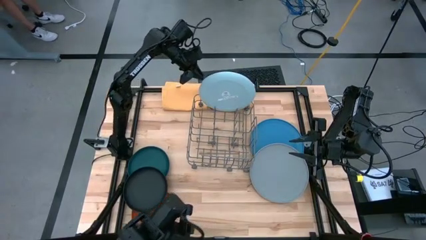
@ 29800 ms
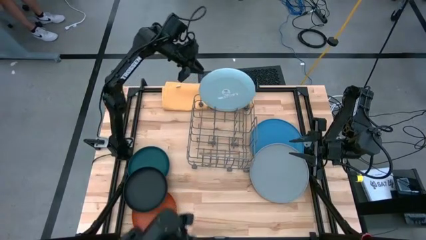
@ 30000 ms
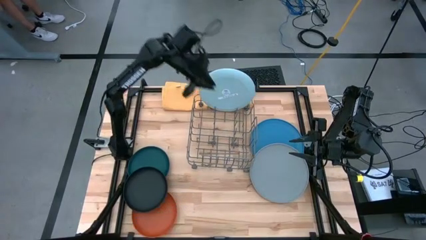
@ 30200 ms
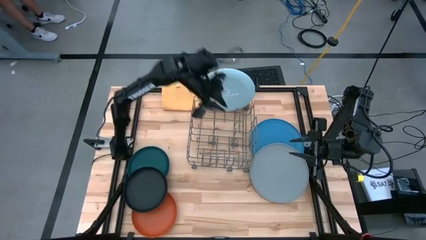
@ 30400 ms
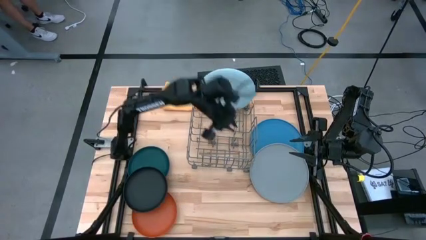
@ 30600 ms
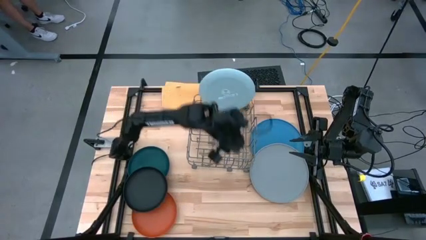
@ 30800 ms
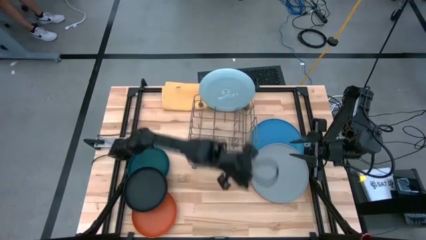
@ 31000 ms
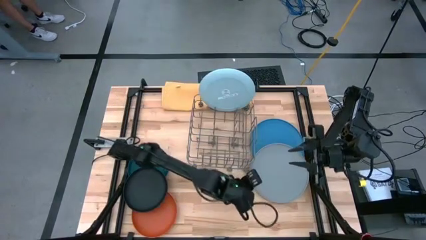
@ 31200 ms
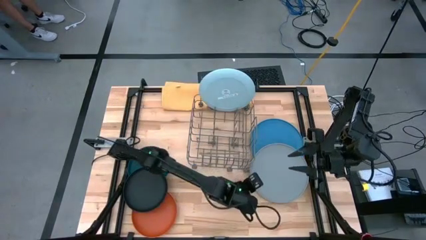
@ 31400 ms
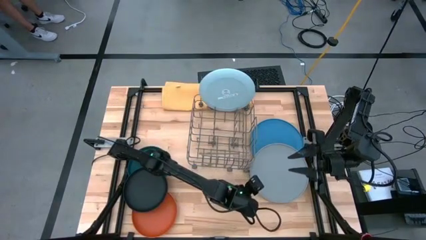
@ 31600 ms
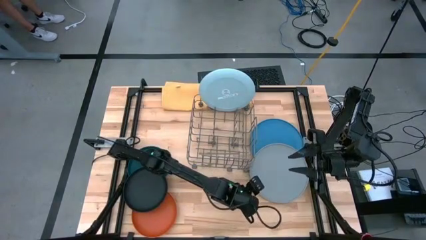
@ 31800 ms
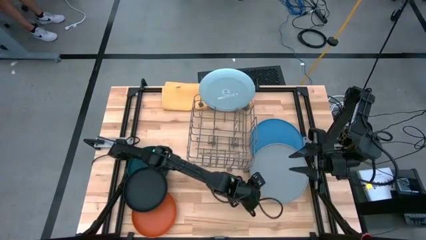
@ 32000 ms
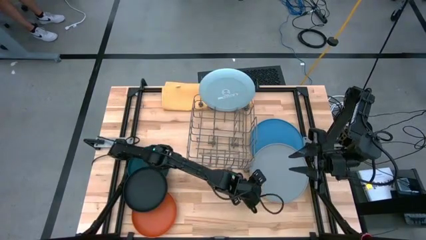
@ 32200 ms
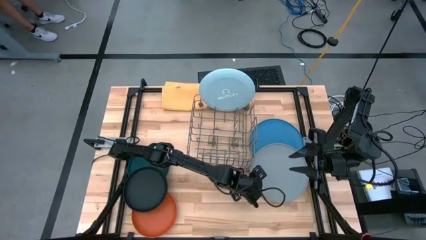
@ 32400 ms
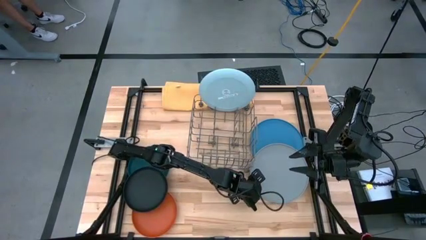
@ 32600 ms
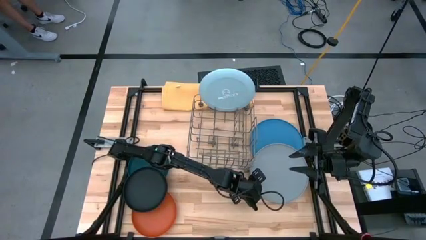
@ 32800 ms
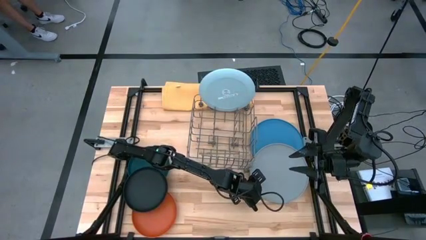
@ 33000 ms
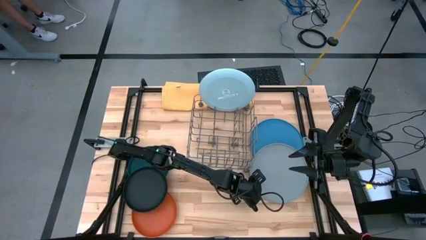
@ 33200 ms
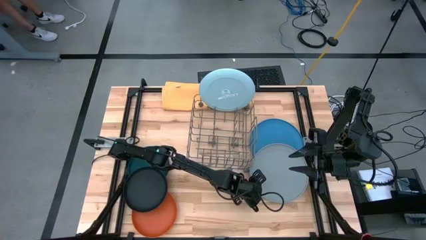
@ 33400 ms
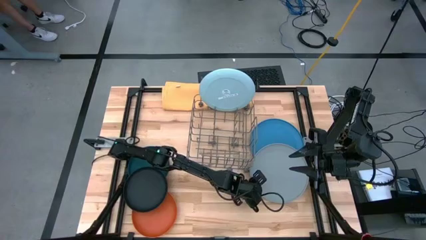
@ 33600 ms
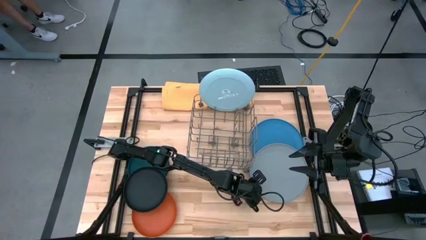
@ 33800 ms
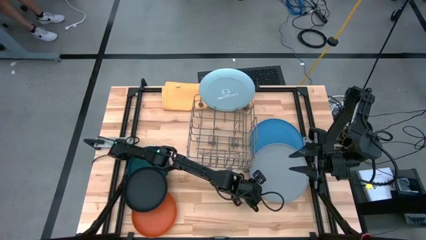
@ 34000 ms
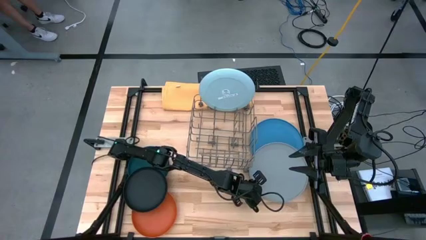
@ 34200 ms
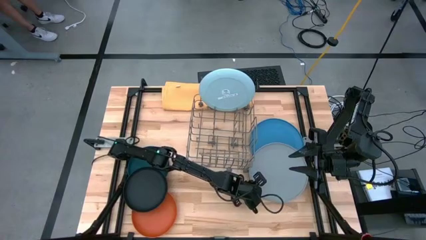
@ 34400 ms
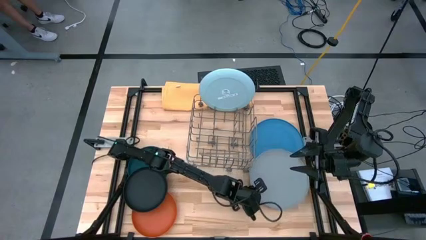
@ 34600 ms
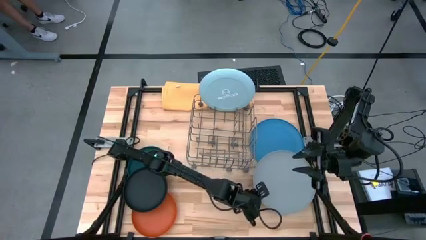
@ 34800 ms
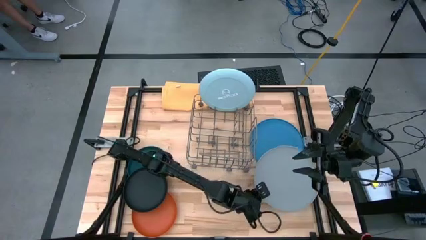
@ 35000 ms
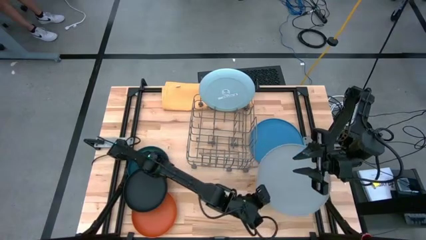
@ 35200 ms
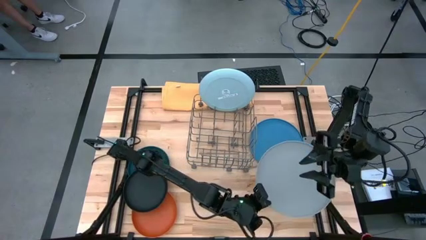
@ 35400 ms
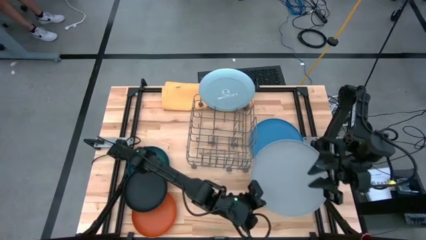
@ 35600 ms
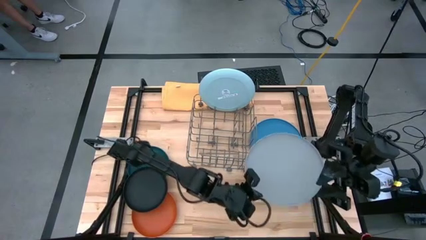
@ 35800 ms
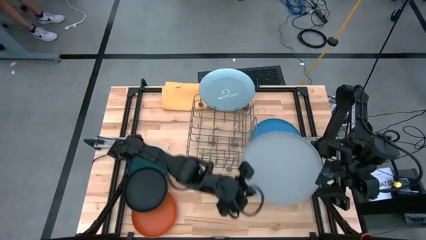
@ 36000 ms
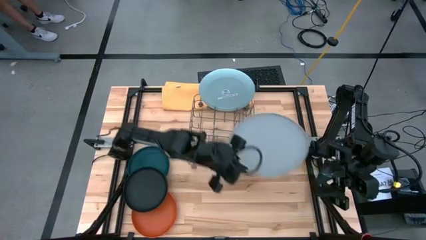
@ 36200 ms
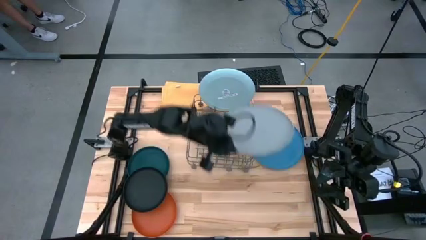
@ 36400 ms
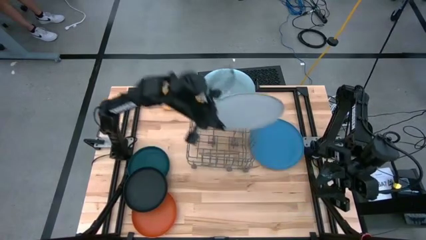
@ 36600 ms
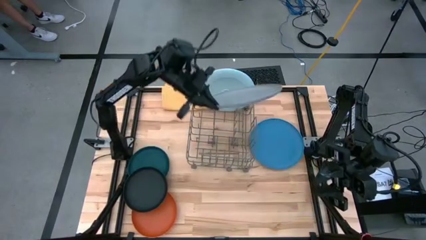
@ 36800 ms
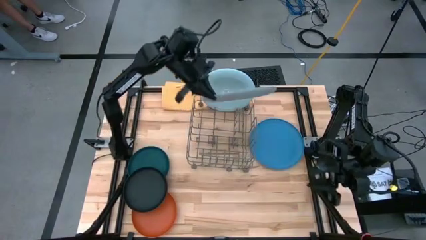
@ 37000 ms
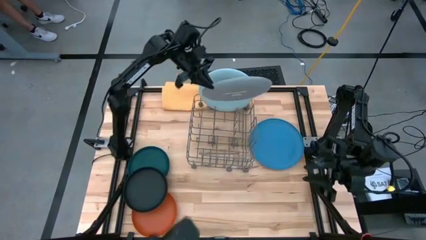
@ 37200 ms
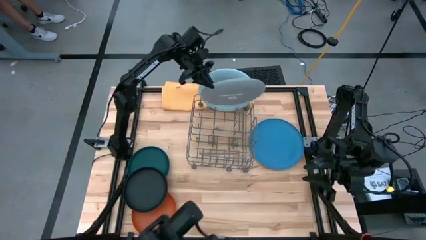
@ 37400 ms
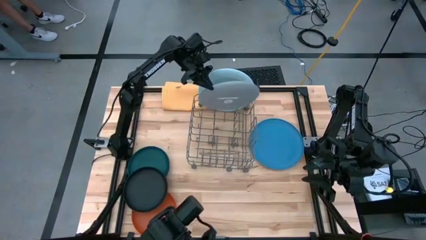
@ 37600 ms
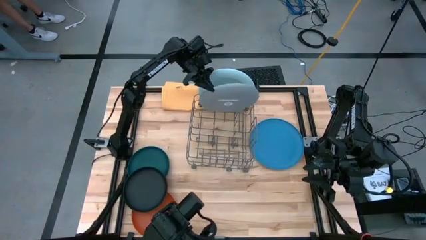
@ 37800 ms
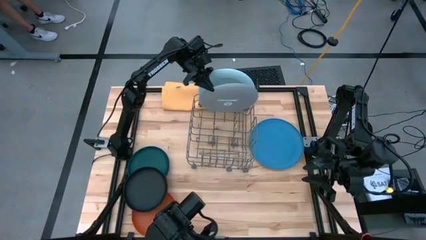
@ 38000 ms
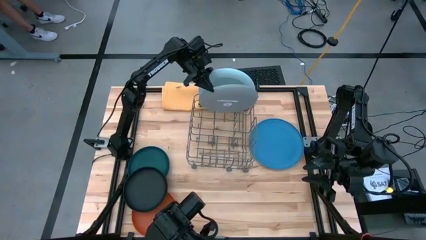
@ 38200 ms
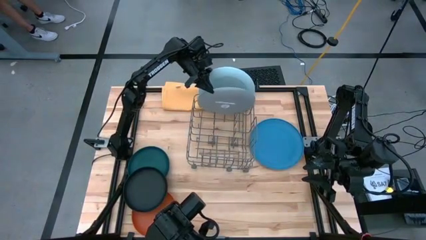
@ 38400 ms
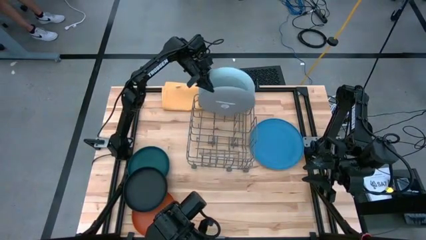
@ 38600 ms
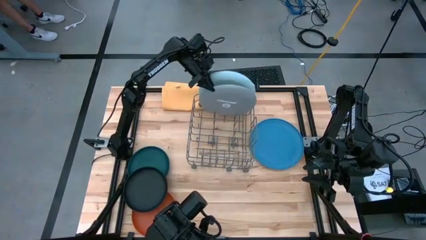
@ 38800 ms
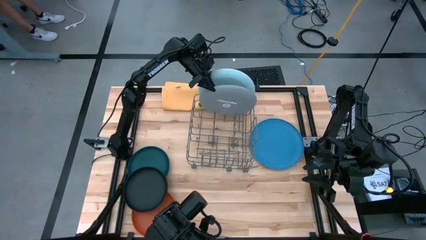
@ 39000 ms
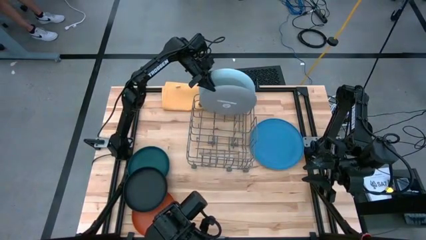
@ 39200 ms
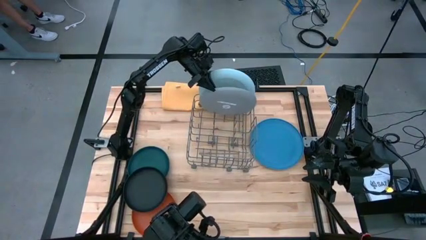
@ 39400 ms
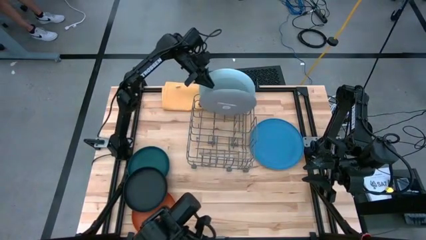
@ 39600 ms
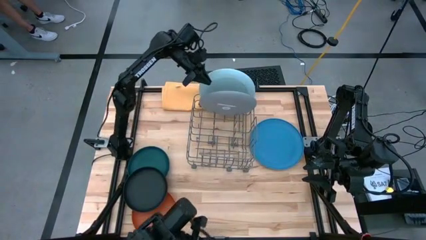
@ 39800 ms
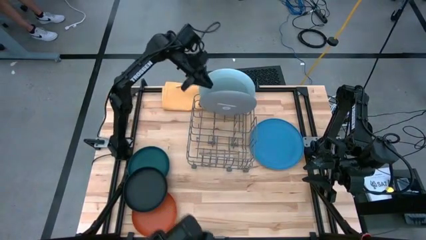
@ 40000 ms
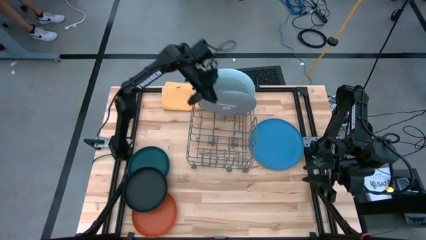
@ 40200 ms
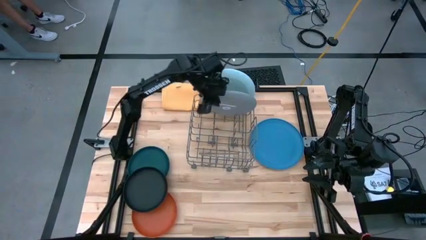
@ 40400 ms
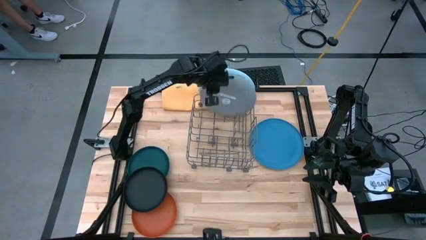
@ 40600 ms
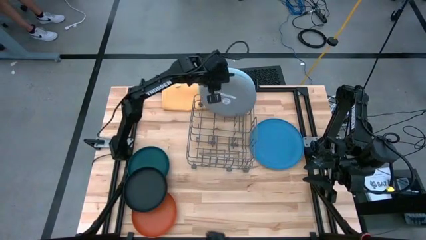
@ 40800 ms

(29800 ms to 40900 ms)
Task: Sort dishes
Put the gray plate into the dish rack

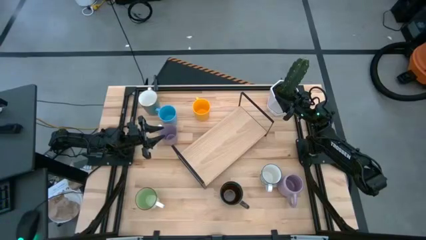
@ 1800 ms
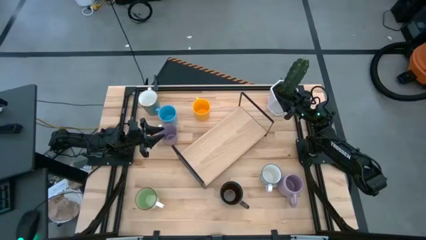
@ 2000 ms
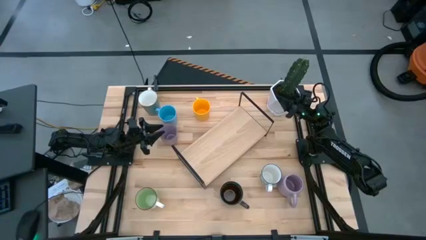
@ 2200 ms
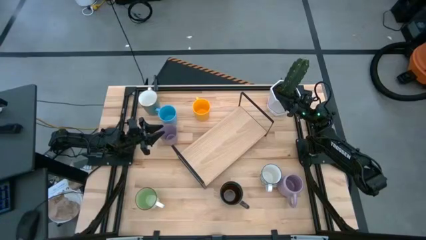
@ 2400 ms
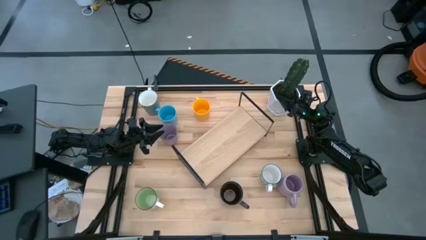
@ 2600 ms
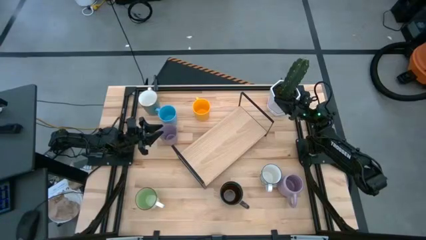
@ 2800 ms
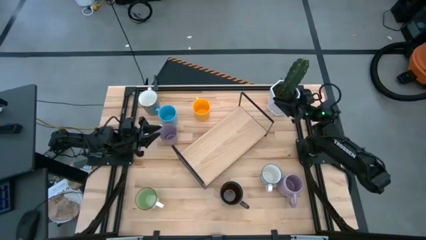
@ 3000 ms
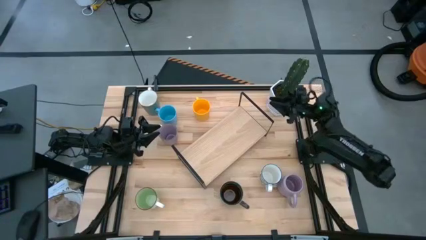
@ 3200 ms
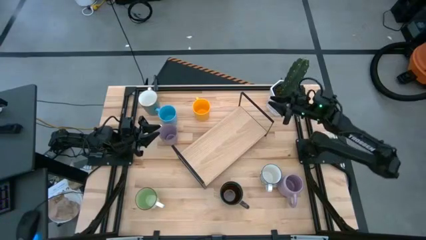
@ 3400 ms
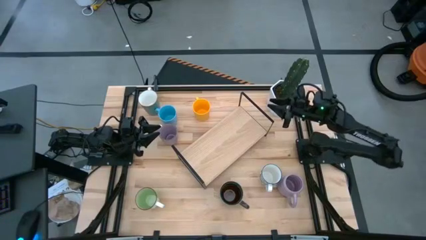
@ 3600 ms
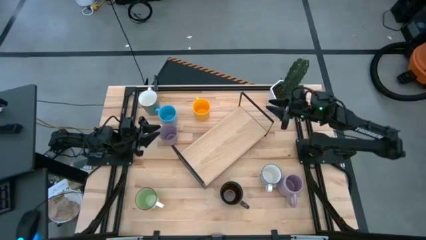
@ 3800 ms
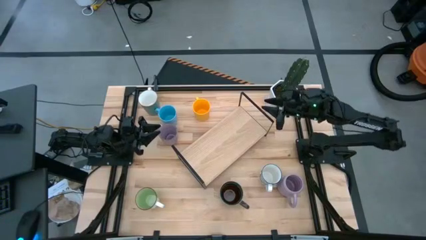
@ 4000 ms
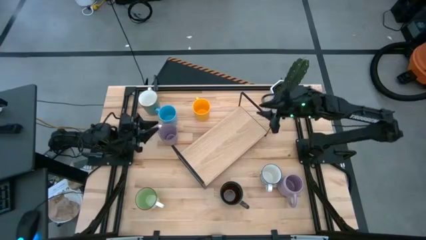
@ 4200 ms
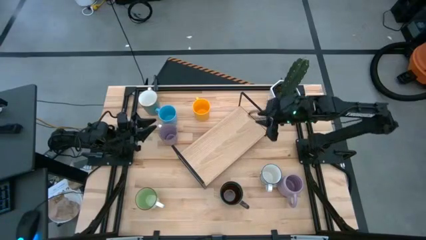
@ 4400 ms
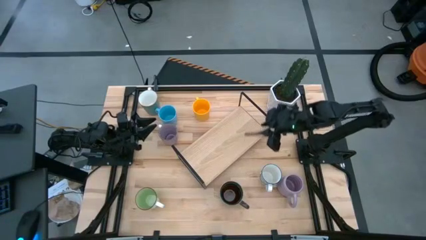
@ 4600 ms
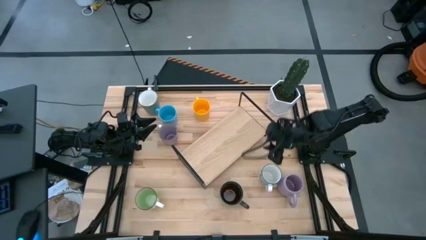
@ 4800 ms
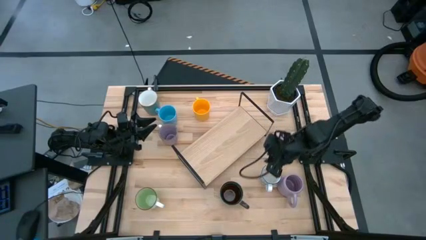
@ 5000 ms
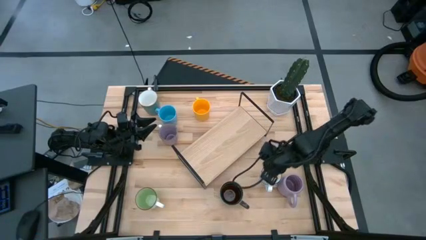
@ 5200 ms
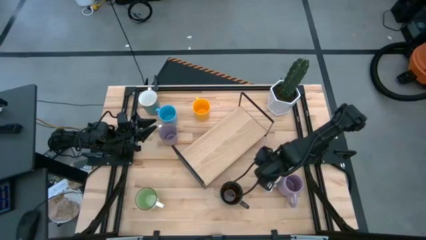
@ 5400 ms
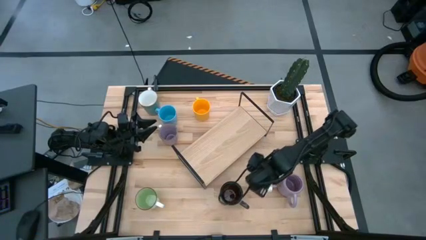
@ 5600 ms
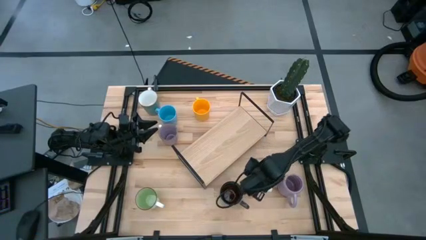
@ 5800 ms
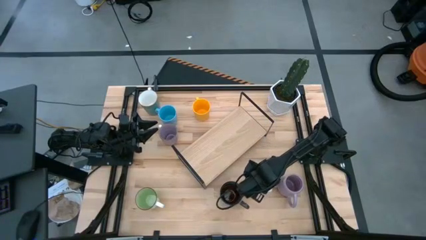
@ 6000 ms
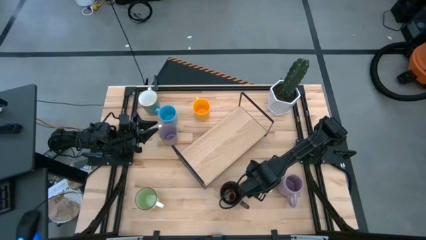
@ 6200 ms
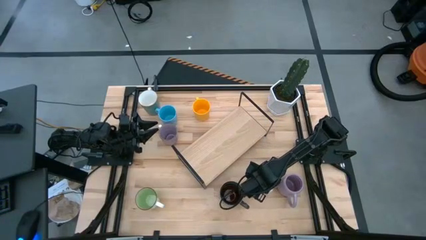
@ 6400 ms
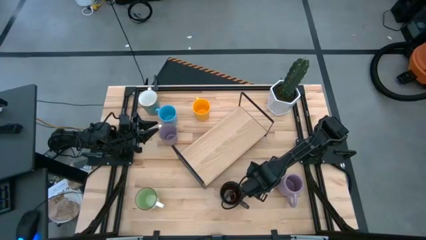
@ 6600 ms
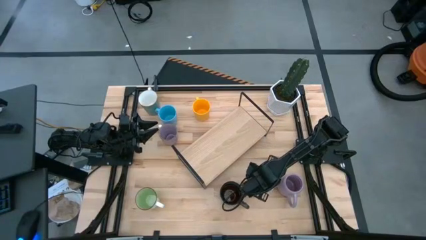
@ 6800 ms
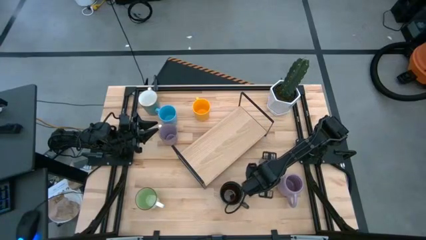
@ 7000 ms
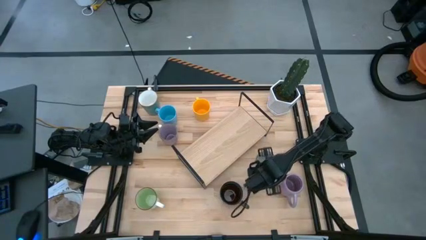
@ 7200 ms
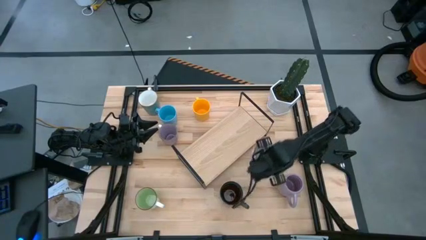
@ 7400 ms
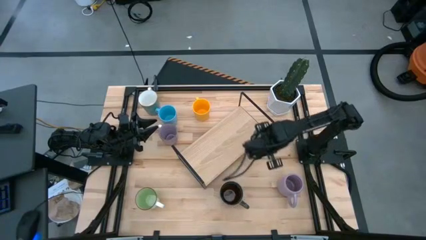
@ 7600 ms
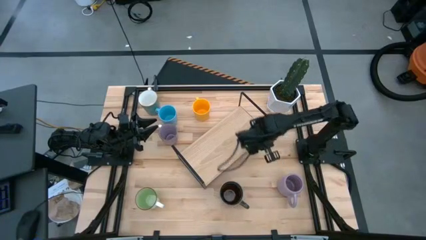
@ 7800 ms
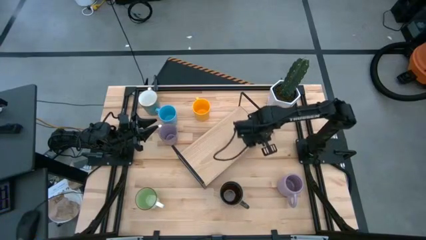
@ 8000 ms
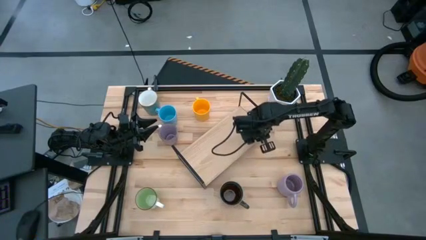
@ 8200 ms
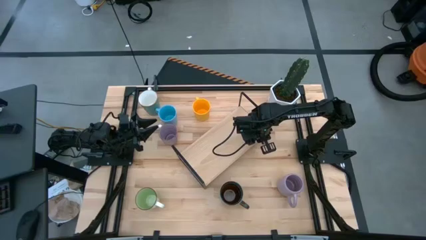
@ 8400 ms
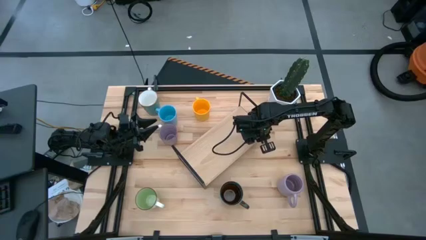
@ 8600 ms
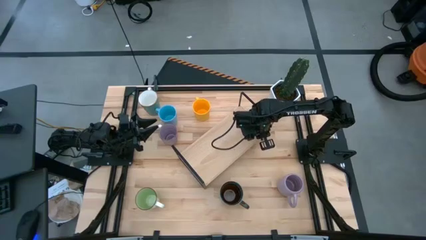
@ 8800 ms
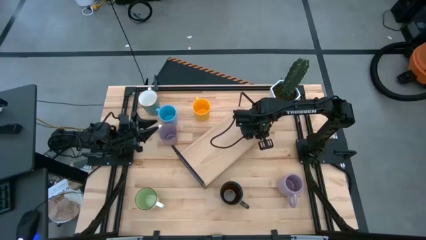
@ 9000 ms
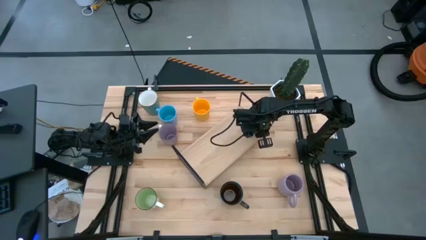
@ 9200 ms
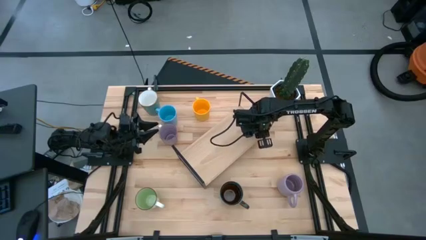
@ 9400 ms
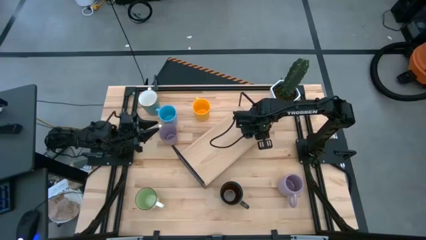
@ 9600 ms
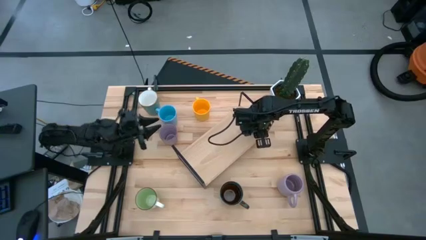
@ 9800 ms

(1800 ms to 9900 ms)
Task: Place coffee mugs
Put the patterned blue mug onto the shelf
